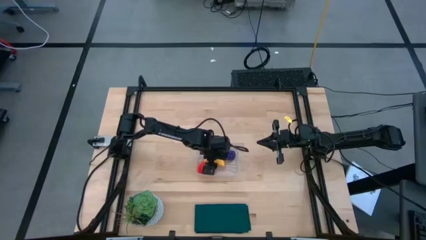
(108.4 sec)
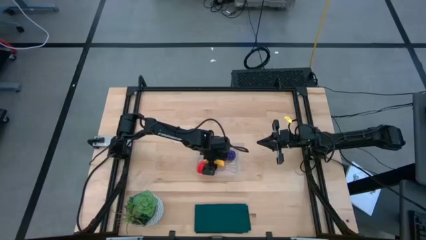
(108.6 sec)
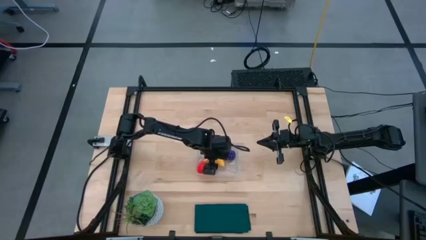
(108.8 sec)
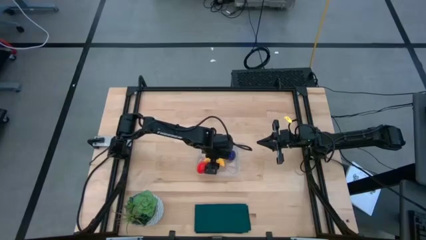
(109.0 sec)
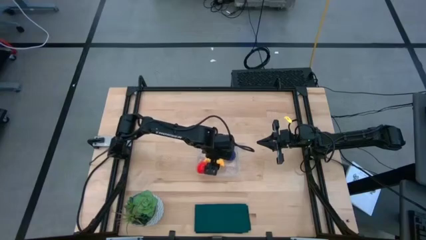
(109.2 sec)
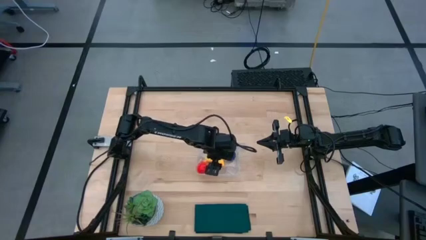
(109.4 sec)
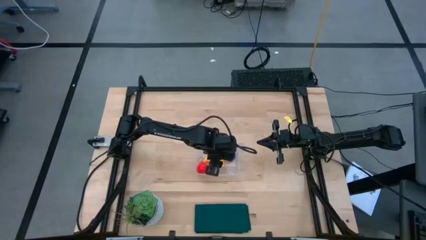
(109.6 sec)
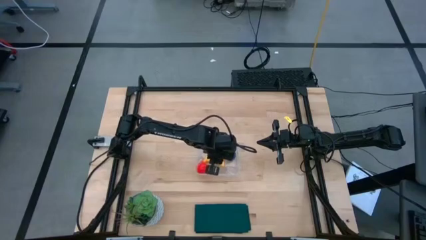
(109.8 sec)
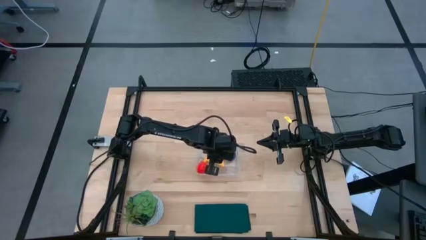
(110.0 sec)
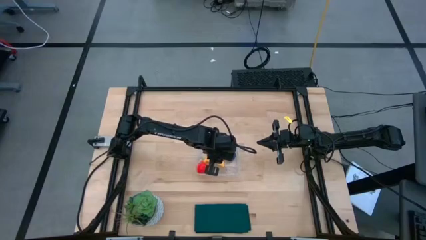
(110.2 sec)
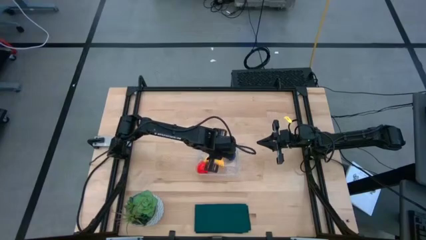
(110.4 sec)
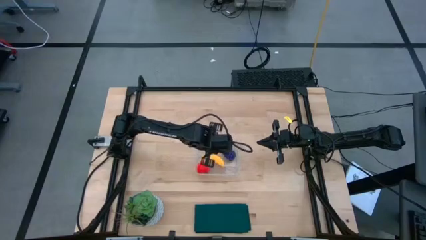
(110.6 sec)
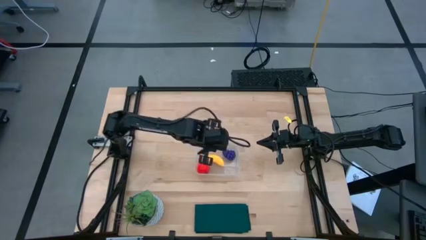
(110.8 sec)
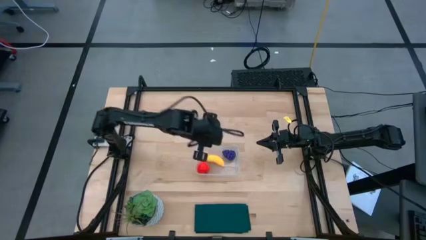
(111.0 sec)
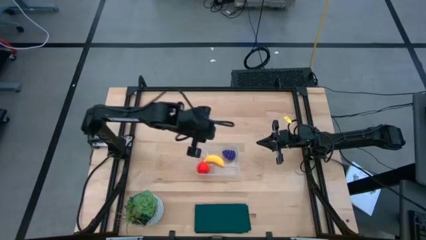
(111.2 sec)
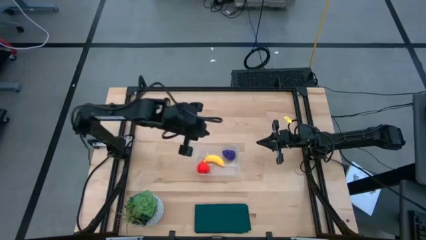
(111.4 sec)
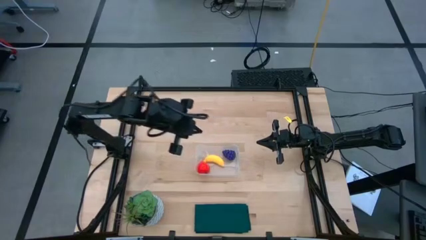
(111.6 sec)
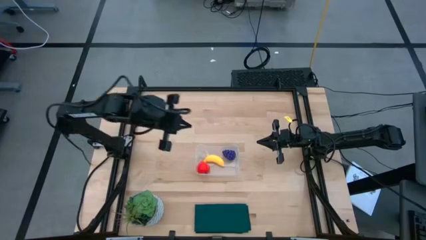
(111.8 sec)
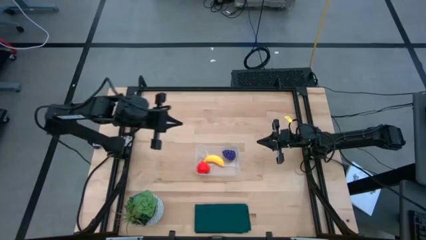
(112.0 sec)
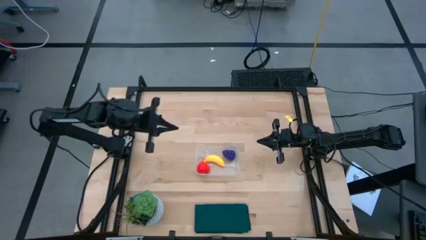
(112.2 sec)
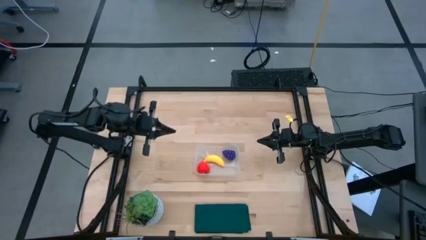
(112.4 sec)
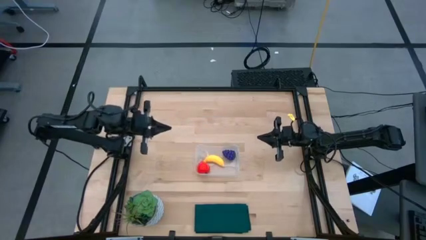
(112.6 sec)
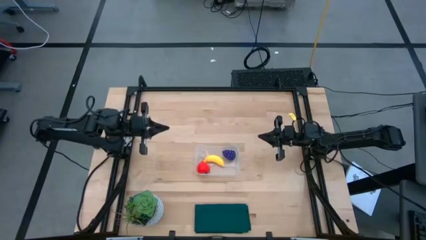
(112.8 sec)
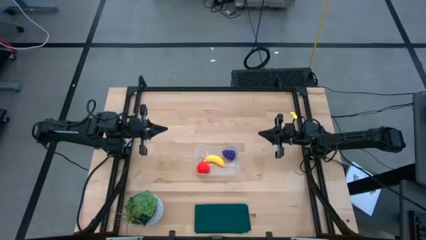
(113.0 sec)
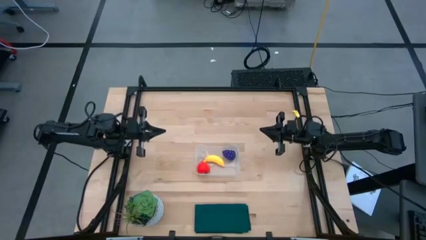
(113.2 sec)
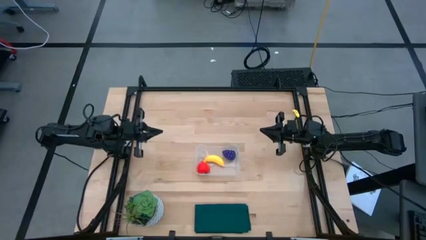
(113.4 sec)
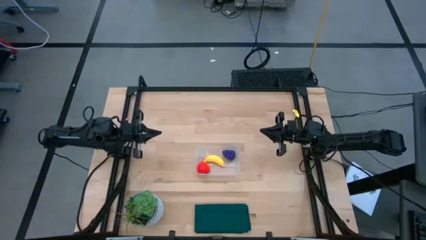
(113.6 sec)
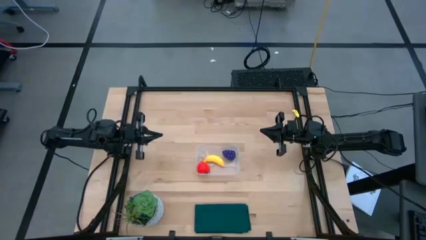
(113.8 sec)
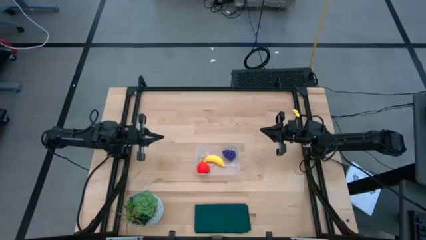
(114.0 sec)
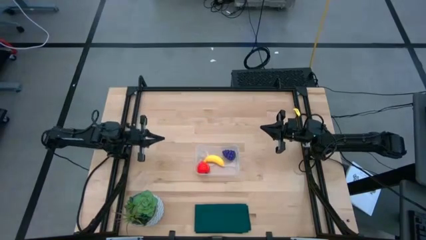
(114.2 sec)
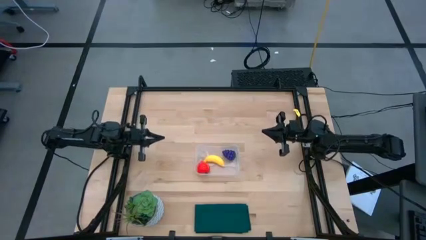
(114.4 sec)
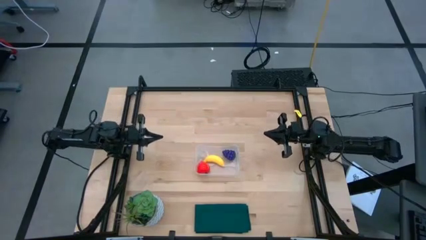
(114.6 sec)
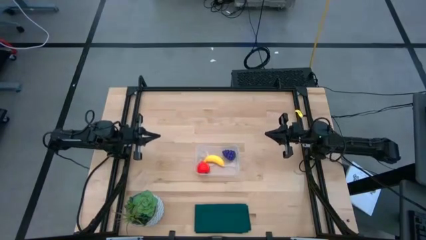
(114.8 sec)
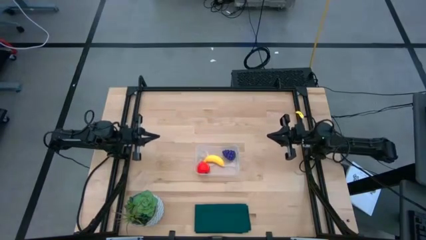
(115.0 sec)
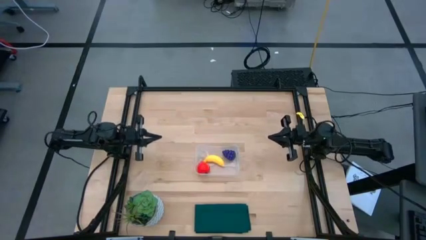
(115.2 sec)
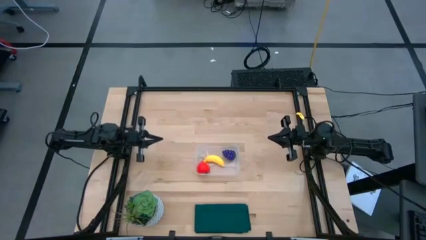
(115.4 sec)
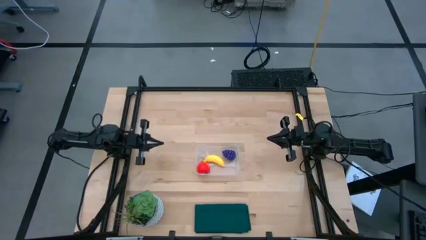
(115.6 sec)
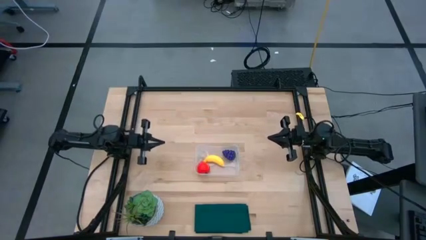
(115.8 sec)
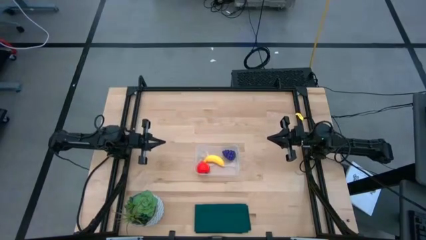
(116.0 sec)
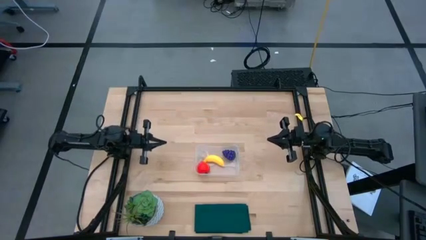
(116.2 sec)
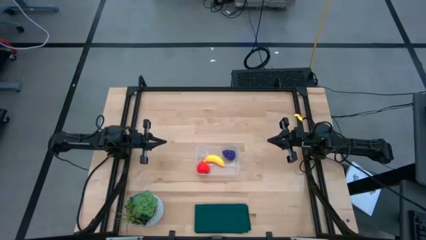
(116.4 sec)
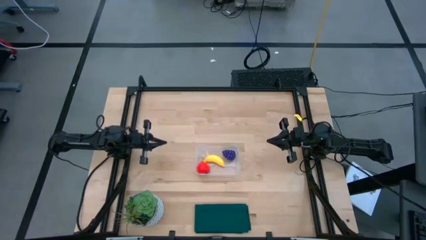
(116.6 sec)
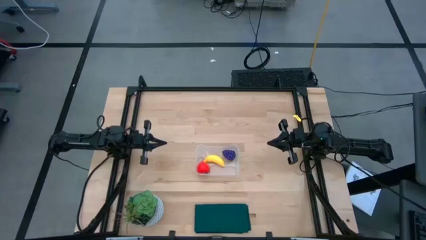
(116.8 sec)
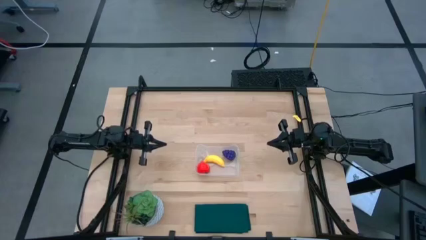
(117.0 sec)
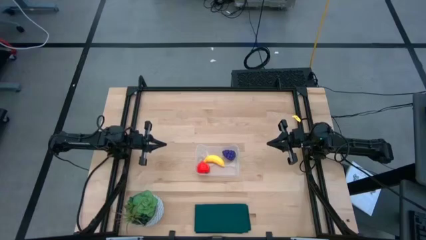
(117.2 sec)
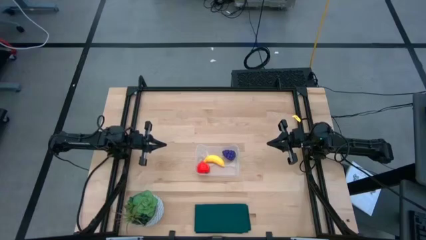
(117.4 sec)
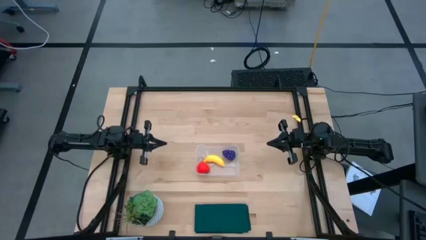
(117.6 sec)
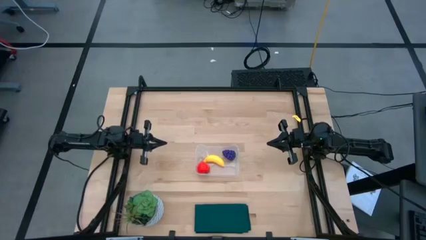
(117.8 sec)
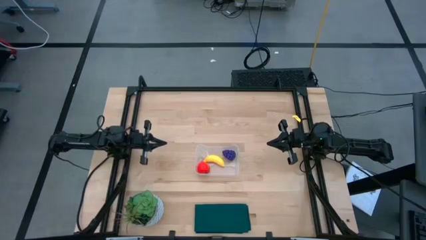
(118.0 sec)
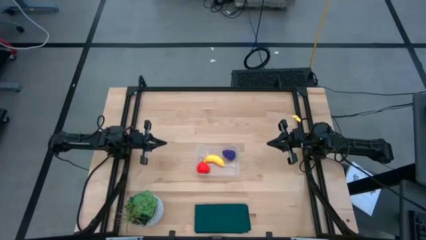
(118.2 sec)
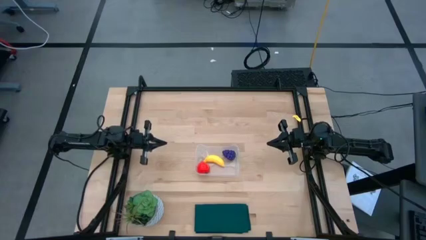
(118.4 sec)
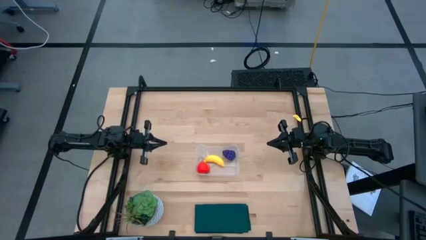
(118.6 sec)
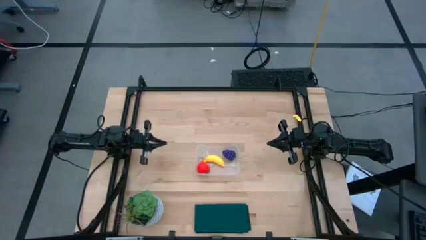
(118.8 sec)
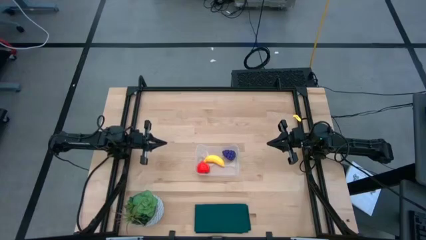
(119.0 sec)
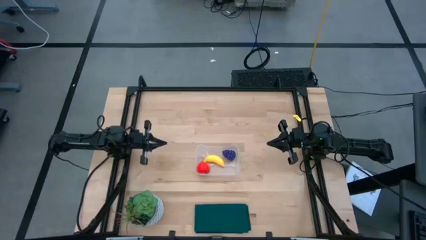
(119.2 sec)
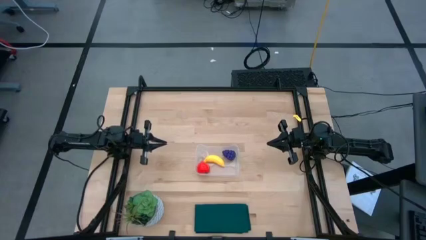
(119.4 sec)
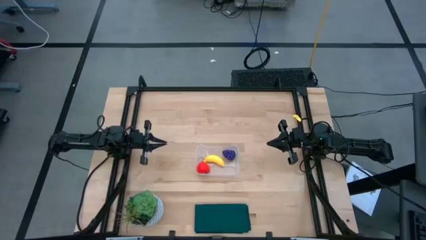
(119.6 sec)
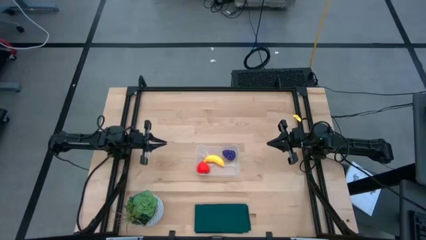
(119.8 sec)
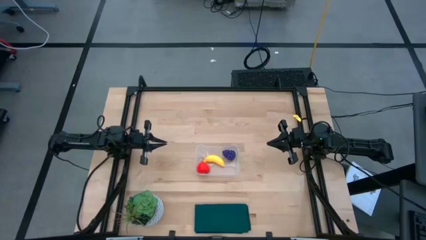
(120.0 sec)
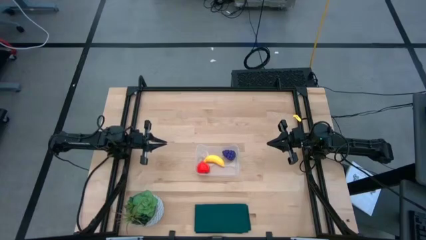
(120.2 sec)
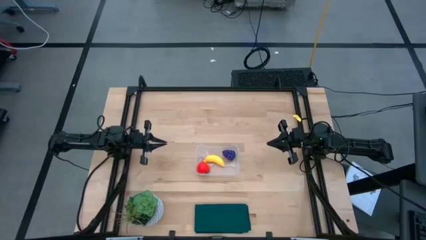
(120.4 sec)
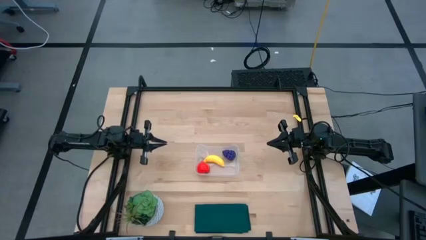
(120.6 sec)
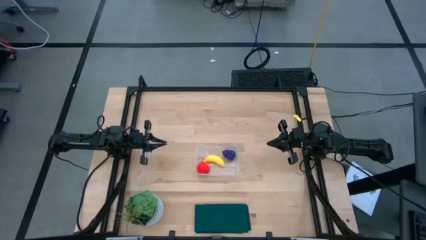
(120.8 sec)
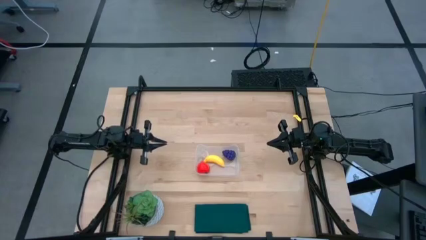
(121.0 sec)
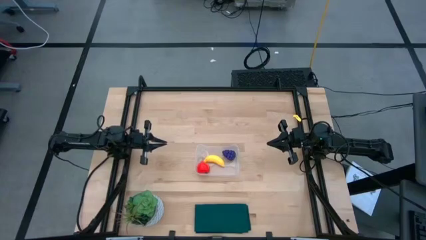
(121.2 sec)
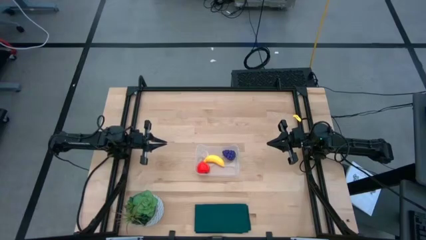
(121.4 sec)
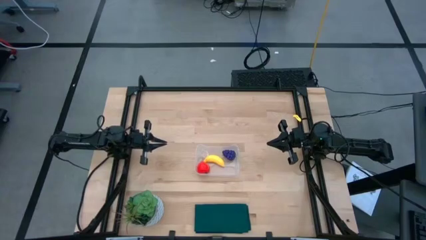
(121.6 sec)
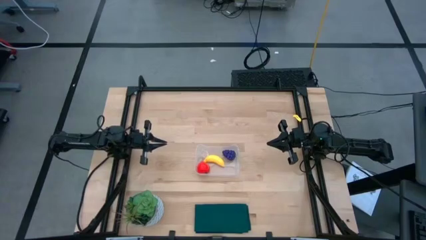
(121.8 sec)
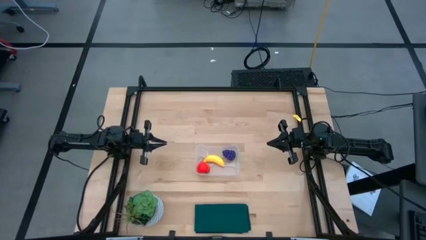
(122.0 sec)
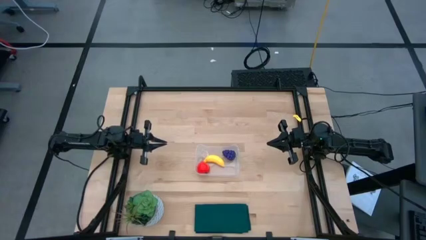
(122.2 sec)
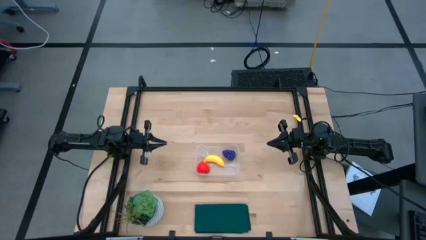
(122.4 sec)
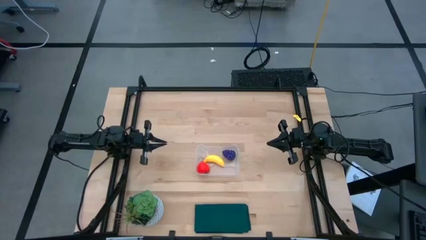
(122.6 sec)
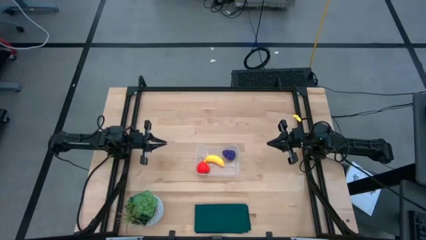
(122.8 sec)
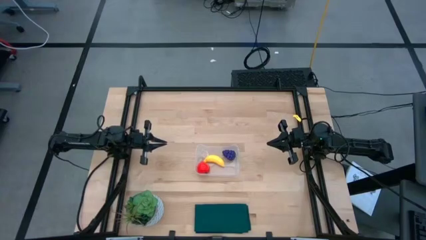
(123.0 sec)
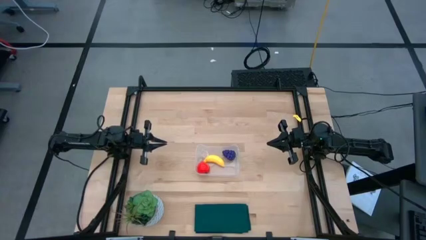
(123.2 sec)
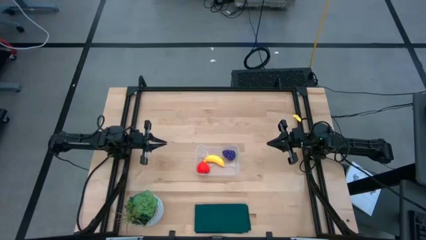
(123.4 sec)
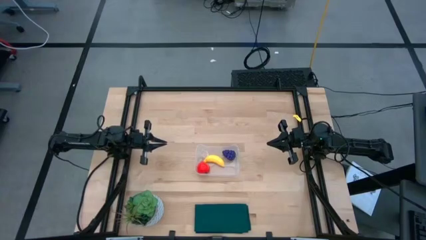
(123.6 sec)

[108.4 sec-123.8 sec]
Task: Pick and placing Produce into tupperware
Return to Home Position
